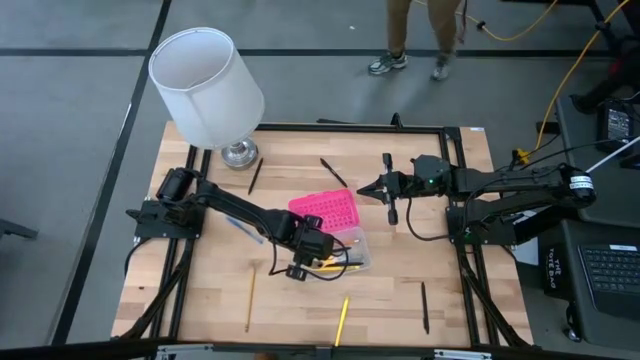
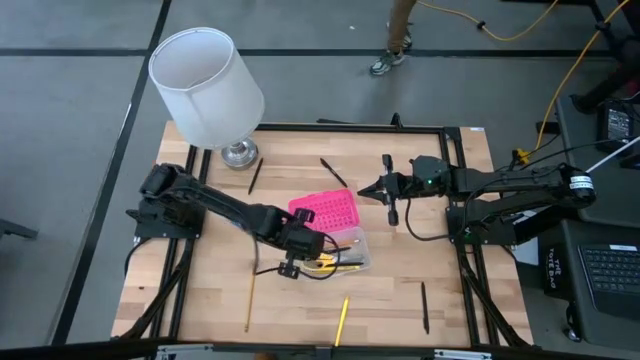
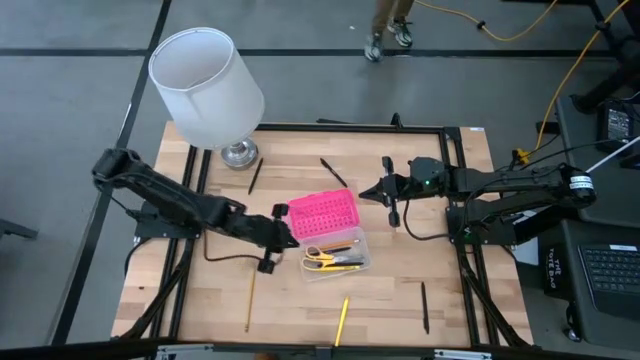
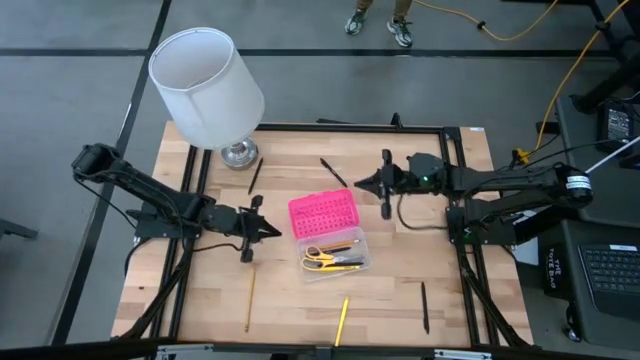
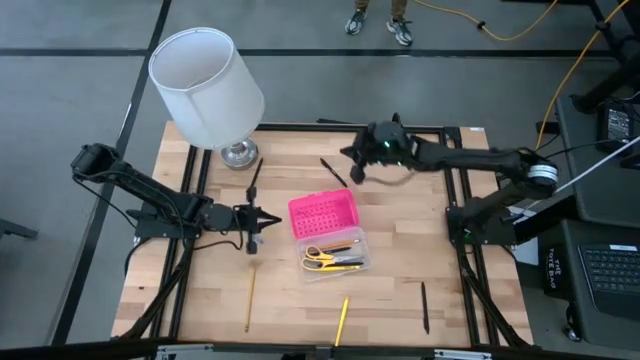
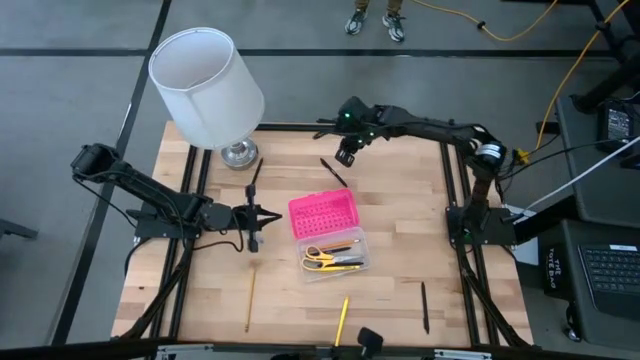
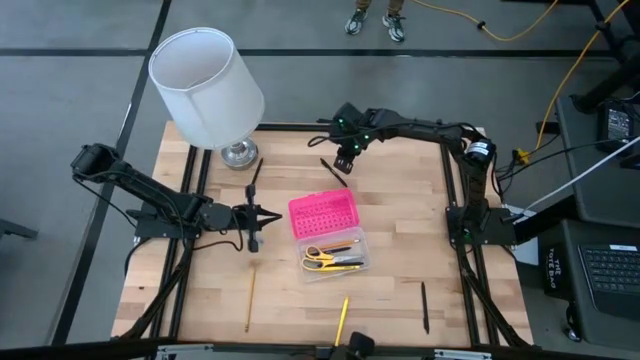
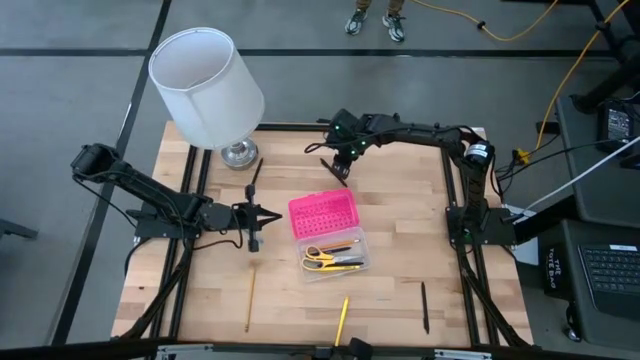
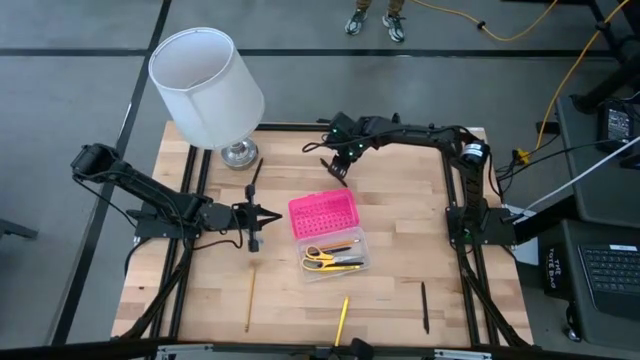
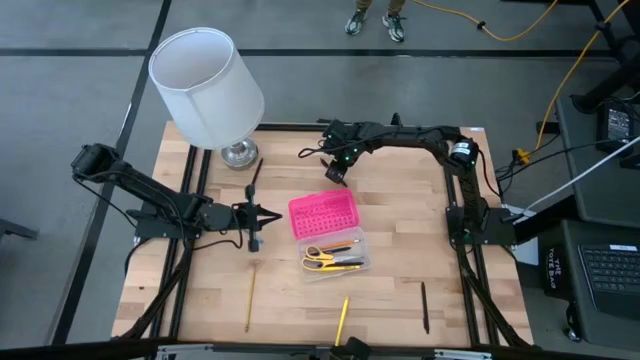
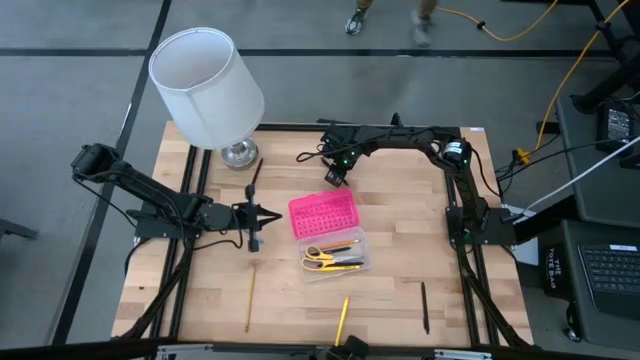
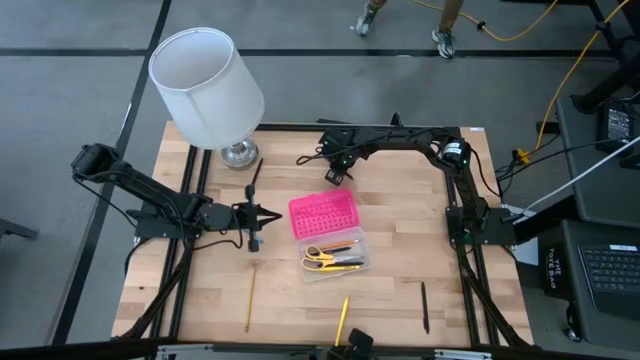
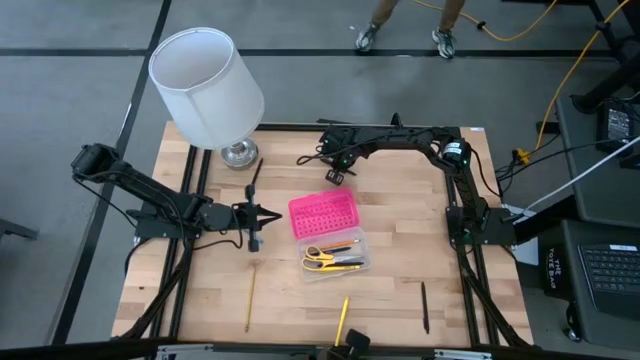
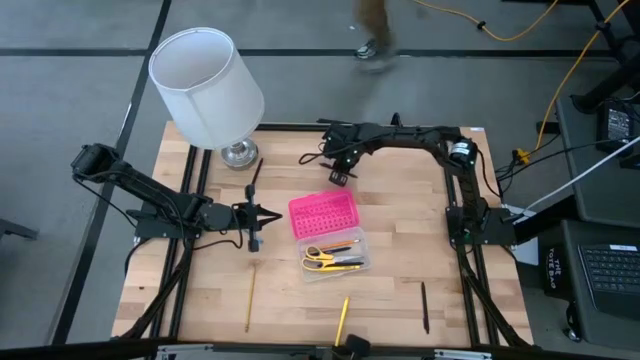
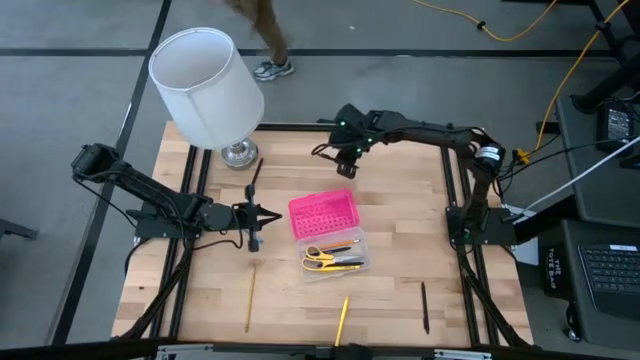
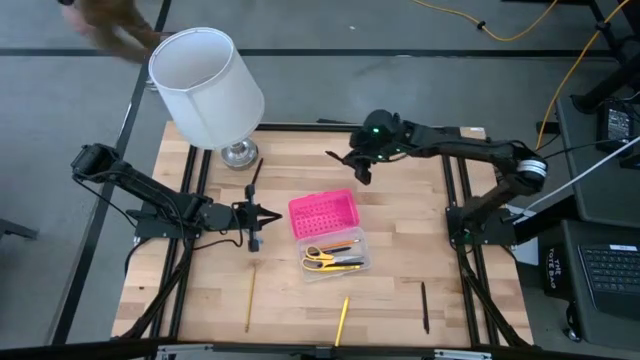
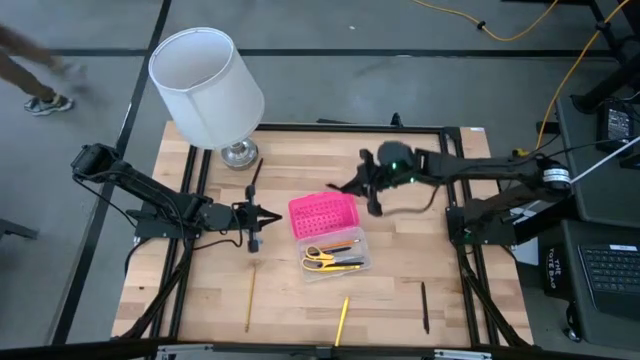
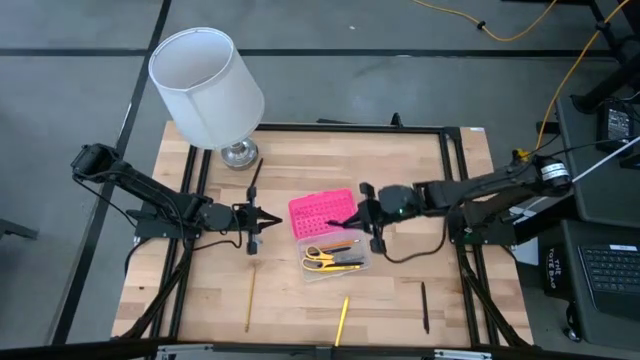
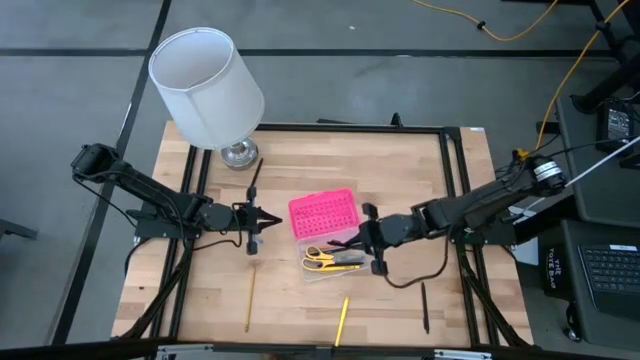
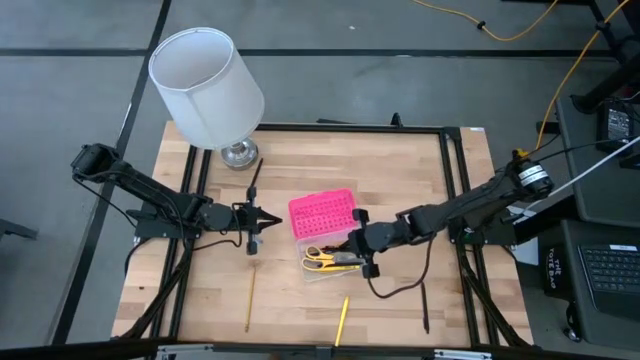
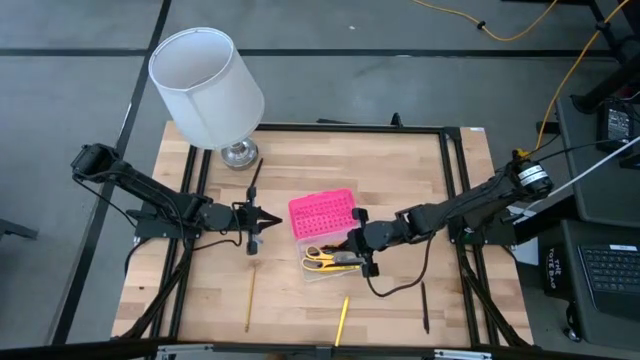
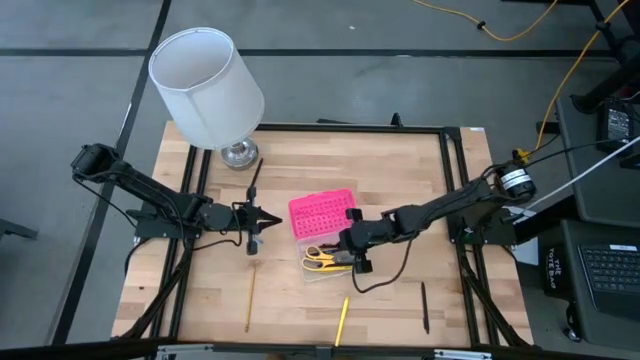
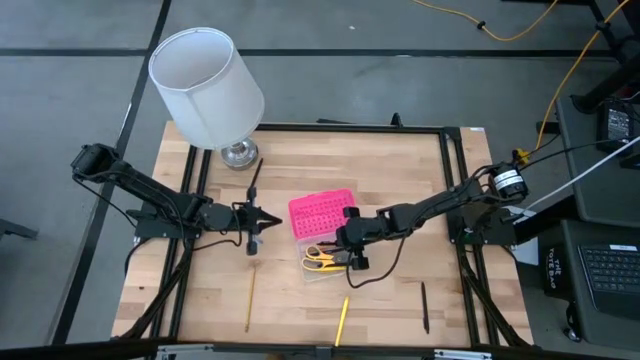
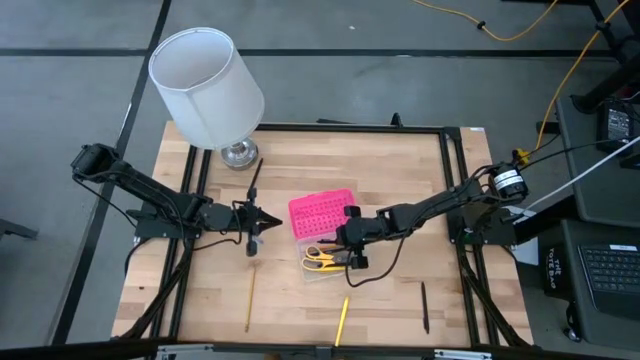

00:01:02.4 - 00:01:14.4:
Task: Pick & place school supplies into a supply box
Put the black pen into the pink supply box

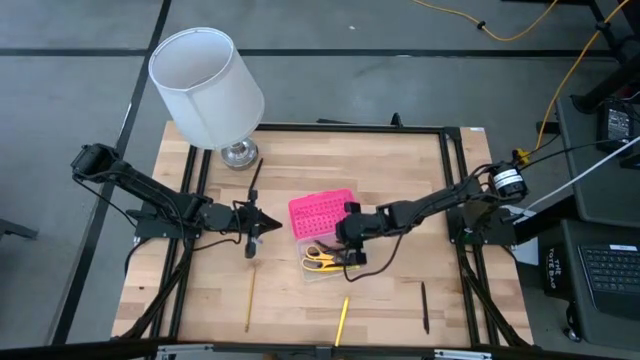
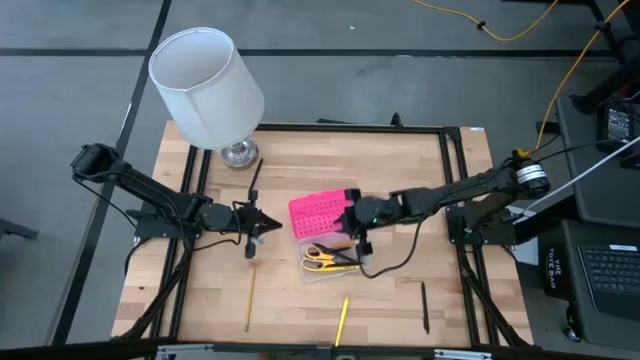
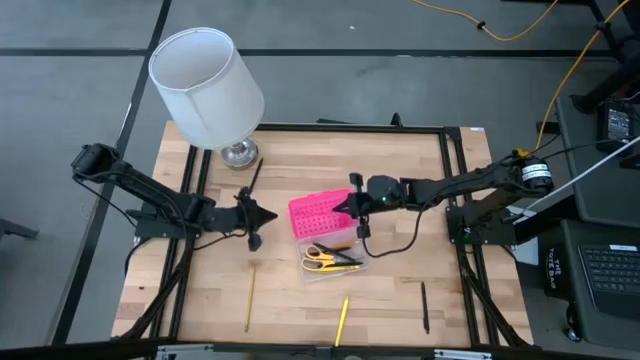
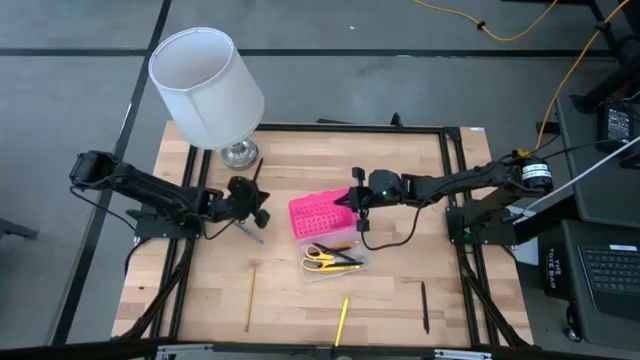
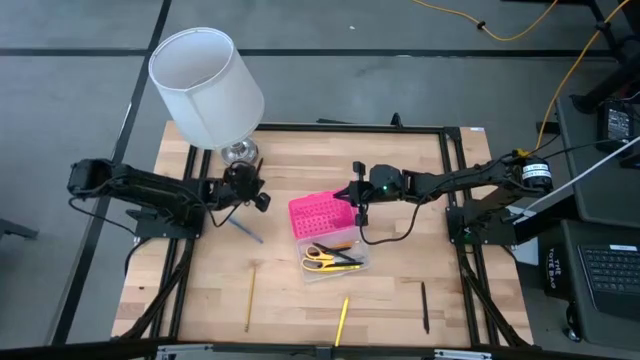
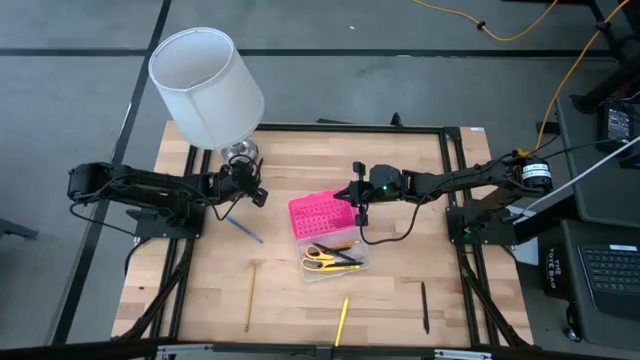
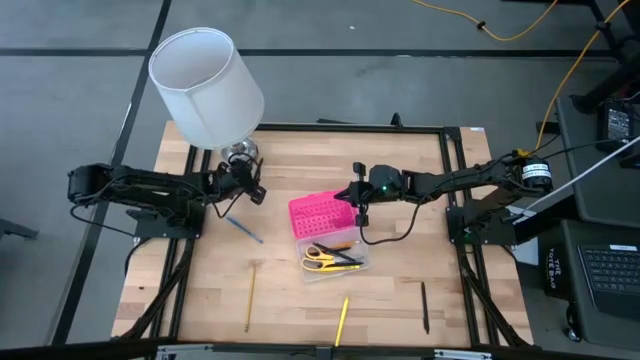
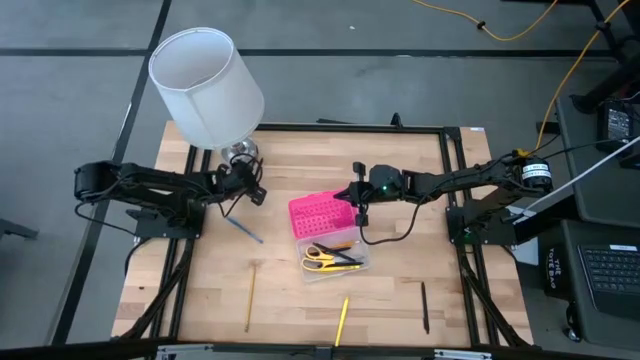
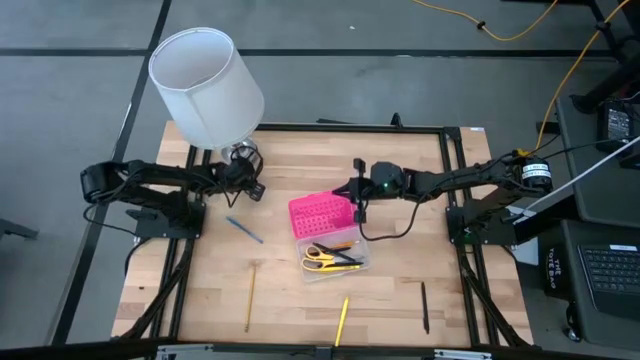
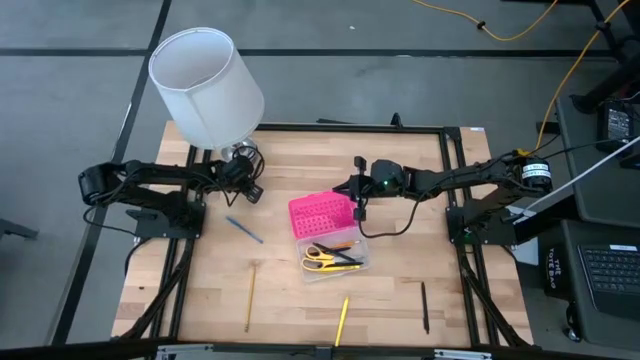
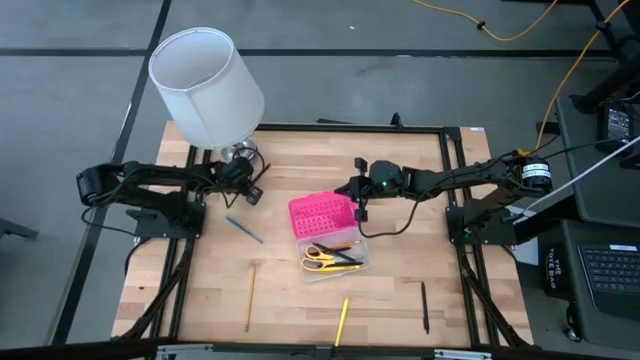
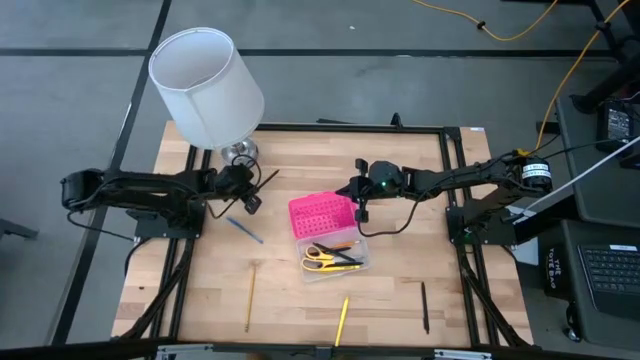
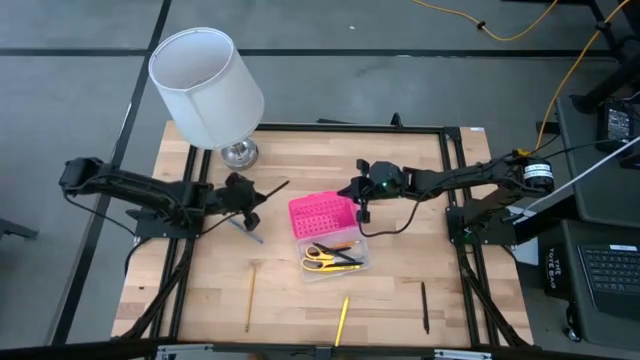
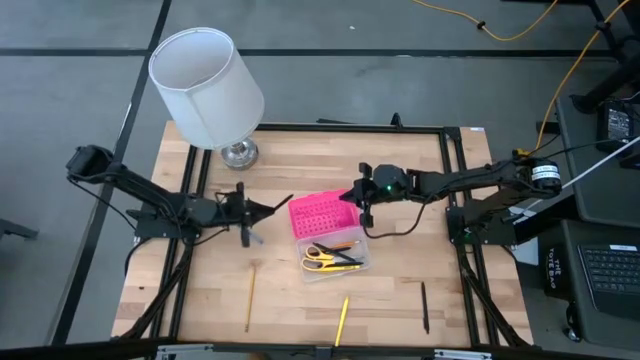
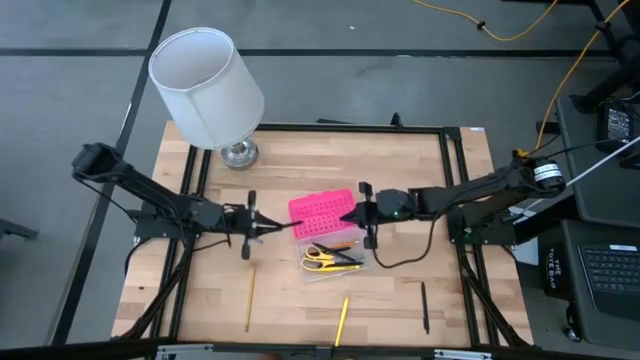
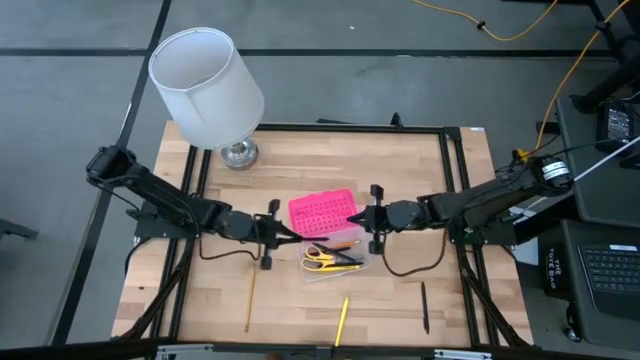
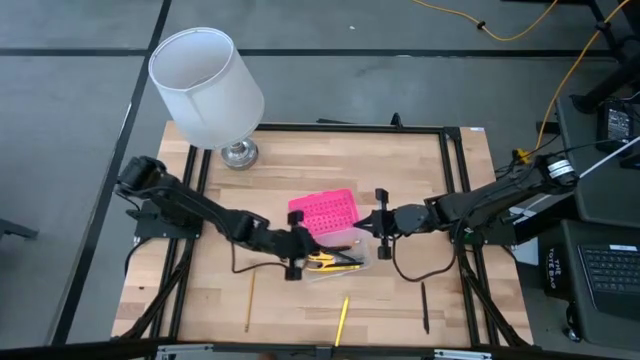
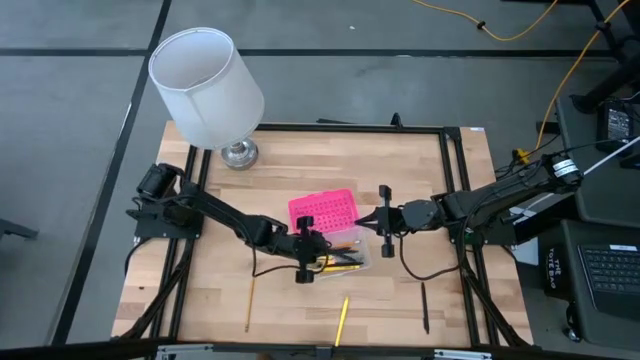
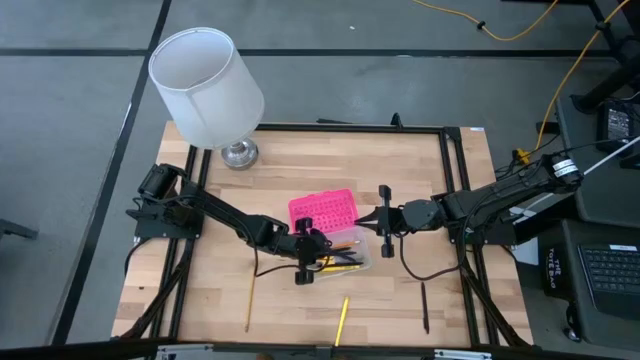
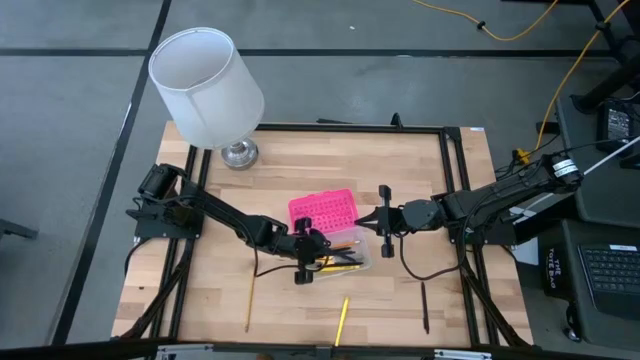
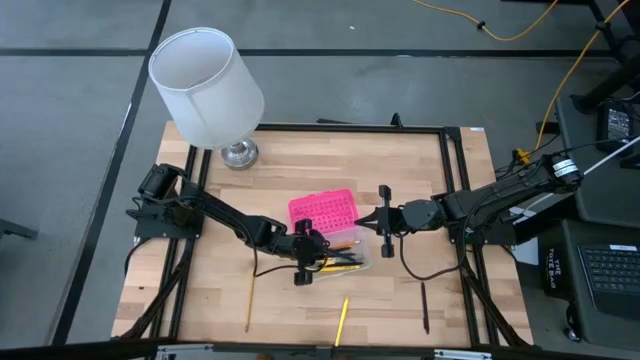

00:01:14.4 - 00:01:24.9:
Put the black pen into the pink supply box
